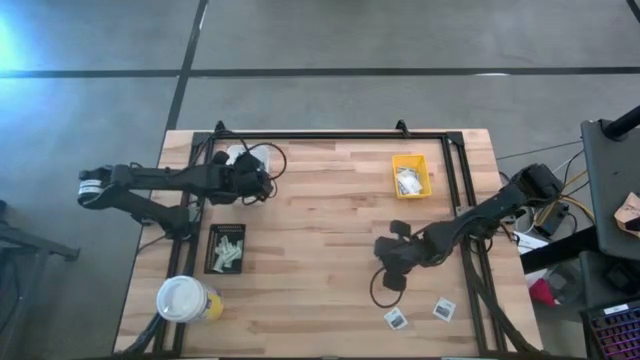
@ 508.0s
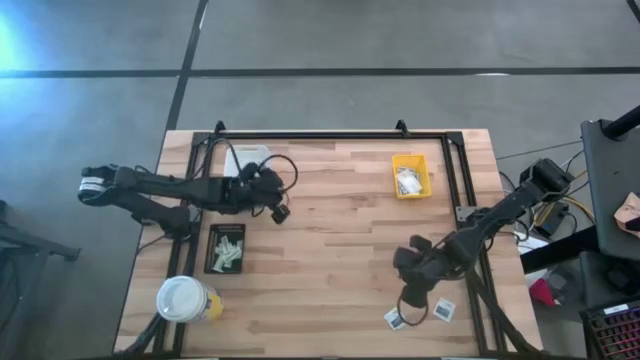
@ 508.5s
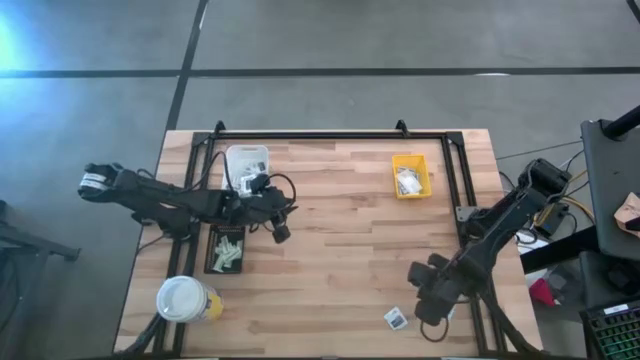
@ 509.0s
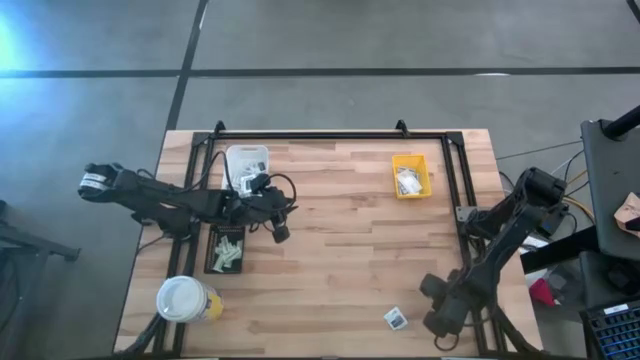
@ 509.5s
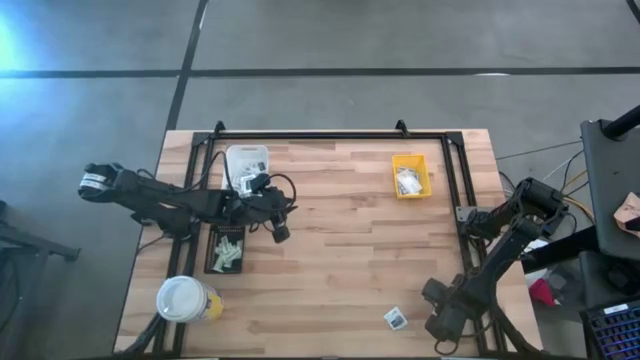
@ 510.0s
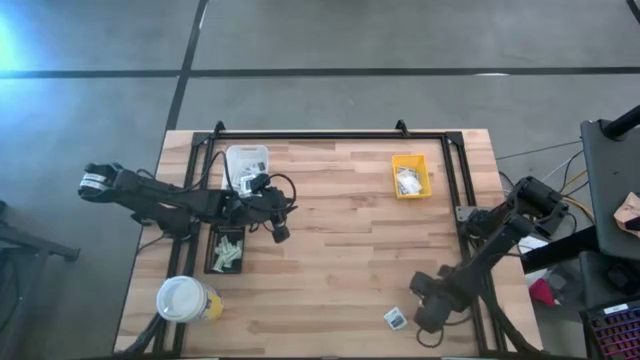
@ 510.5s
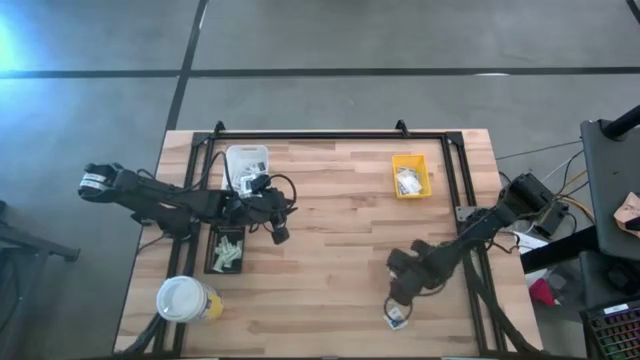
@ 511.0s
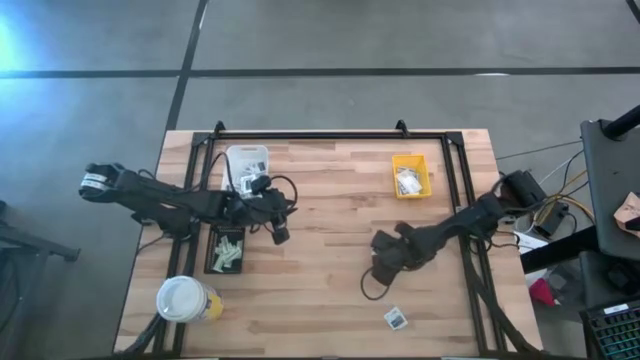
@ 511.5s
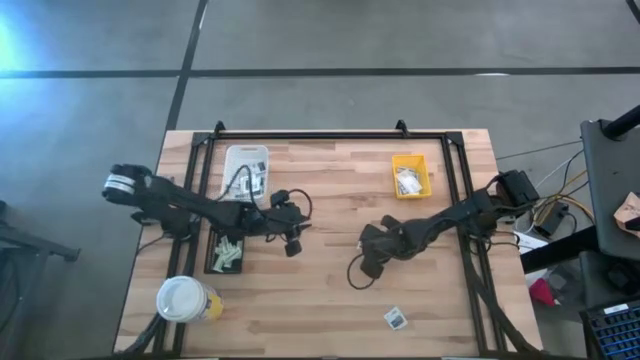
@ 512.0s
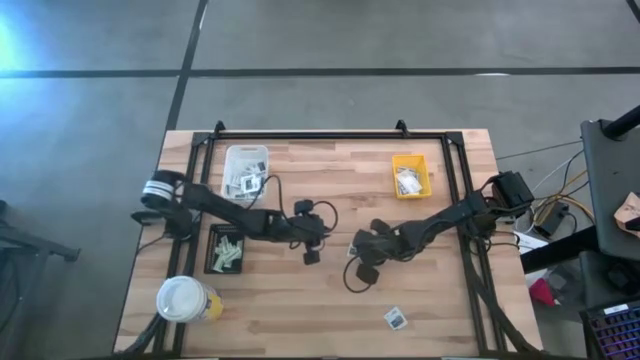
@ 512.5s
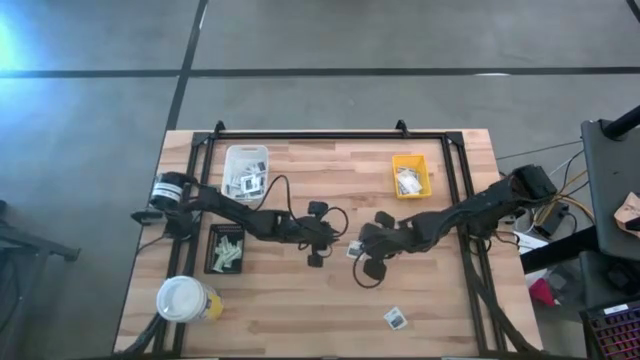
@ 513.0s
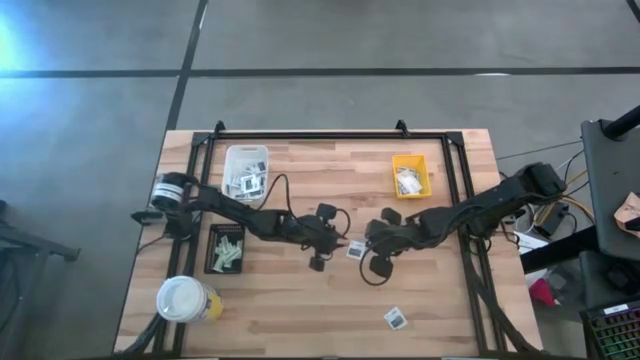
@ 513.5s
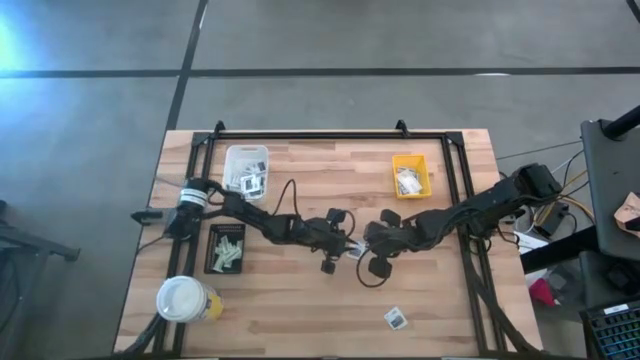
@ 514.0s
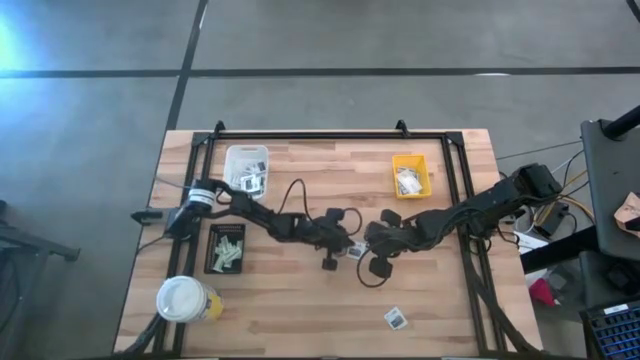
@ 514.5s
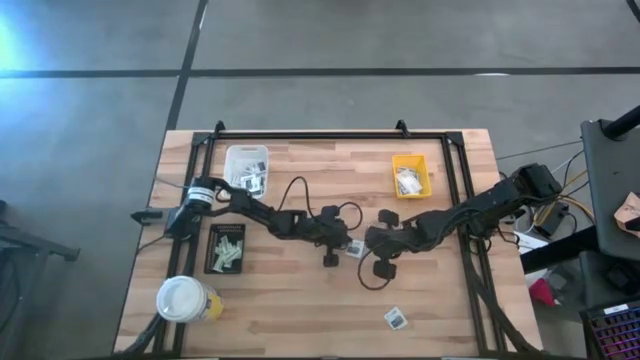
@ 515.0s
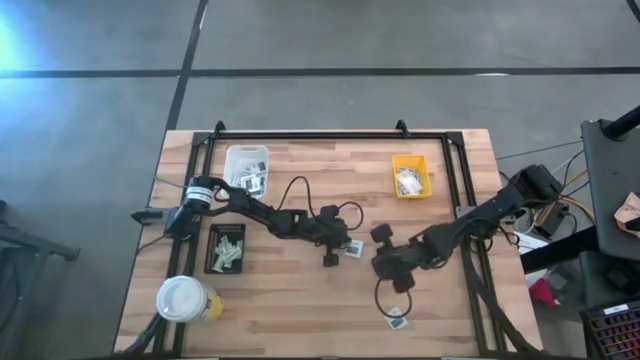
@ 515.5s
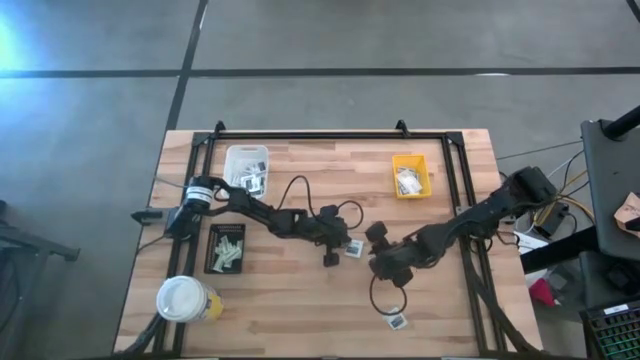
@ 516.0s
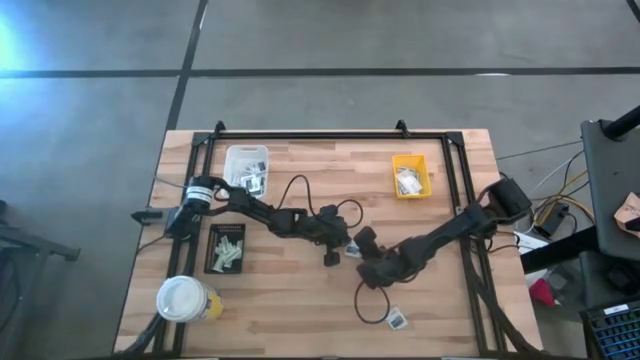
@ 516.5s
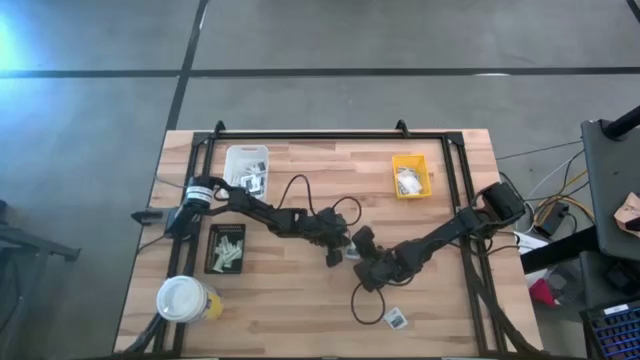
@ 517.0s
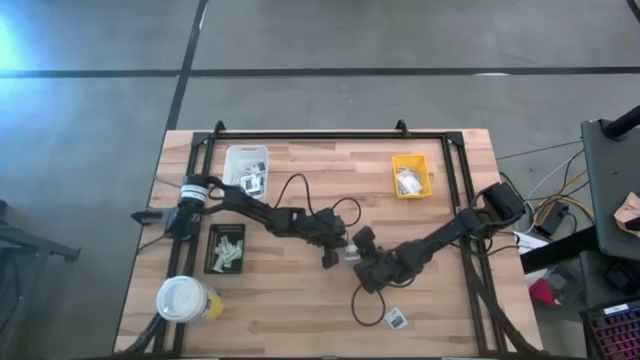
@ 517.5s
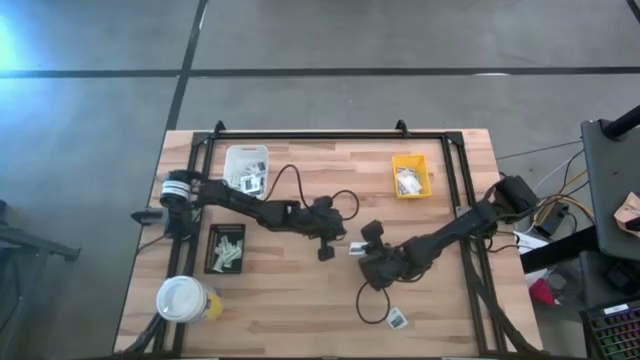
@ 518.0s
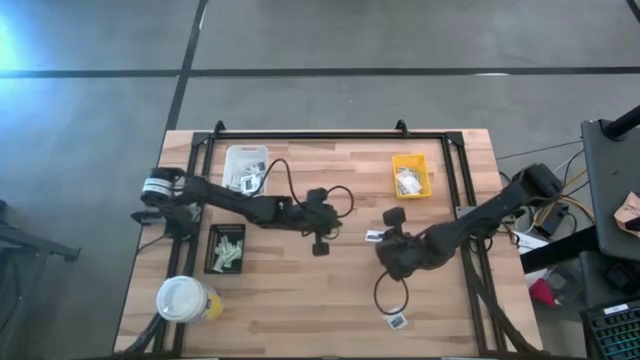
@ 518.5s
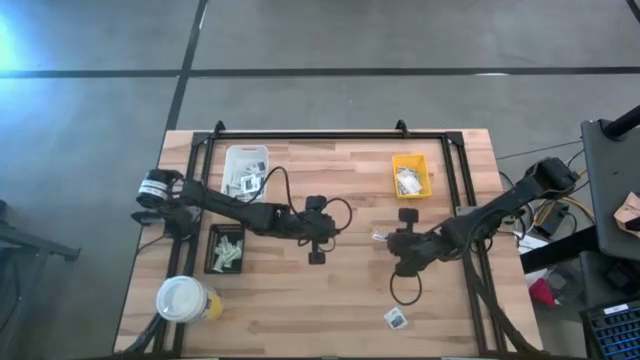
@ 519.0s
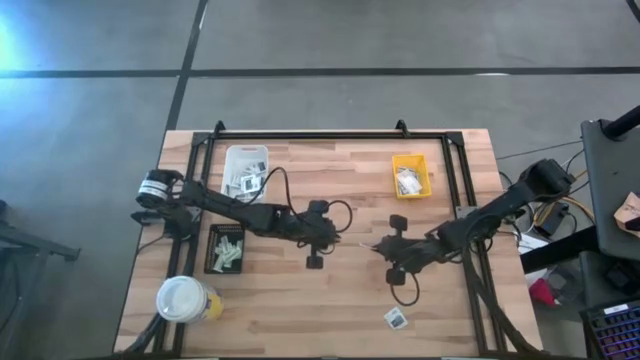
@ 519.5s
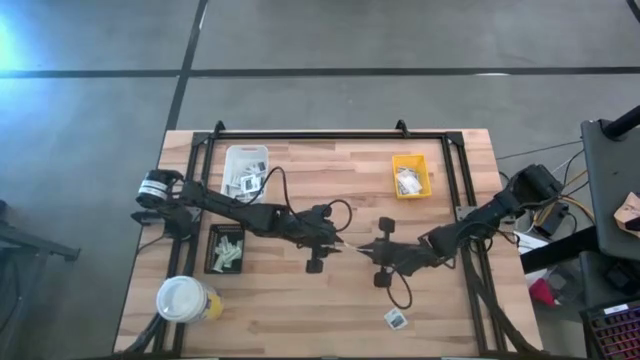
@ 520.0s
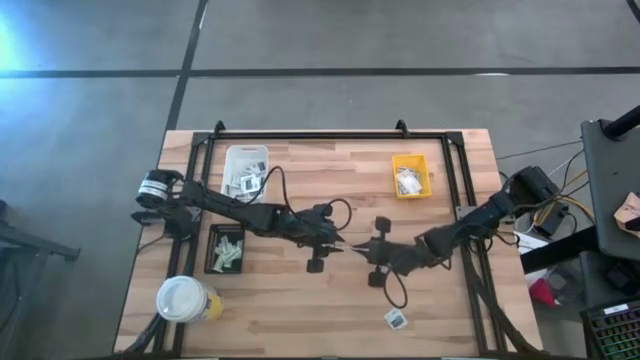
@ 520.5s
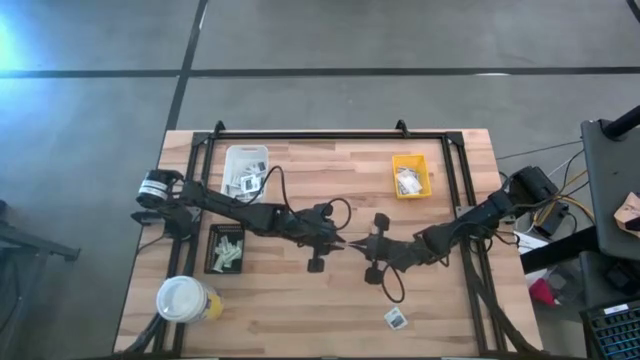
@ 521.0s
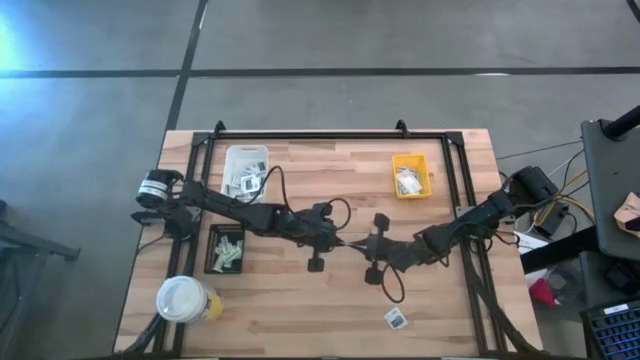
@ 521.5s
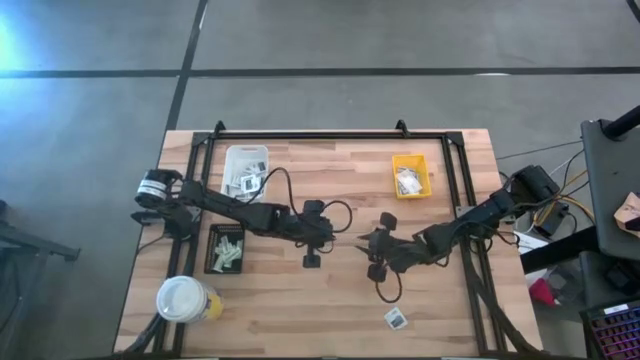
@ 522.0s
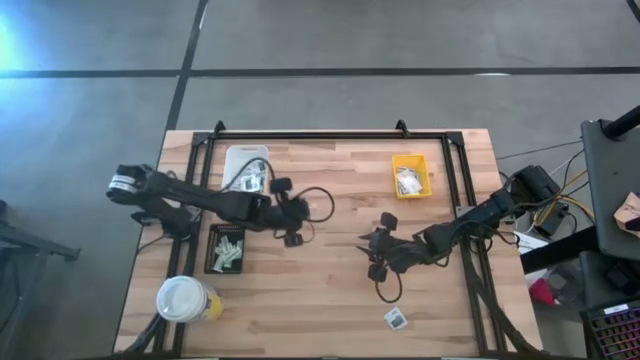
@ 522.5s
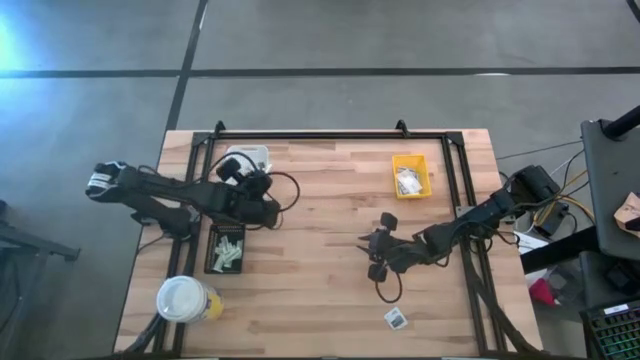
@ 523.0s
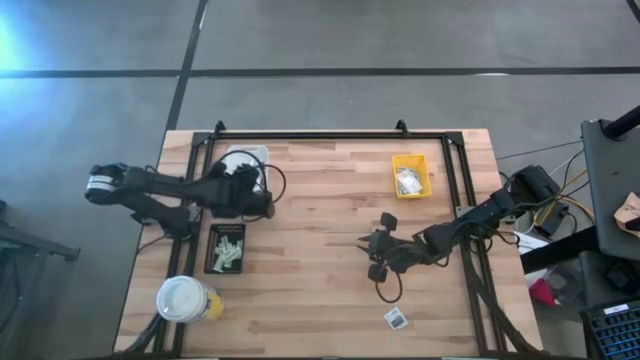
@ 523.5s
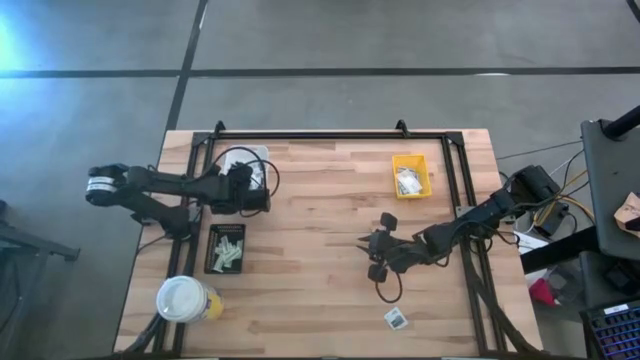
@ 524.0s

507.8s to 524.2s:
Task: Pick & Place First Aid Supplies
Put the gray towelette pack into the white bin

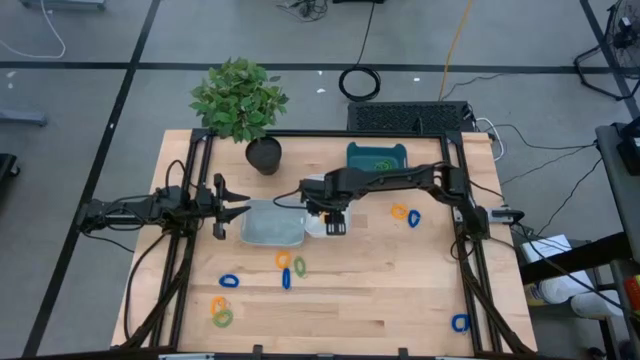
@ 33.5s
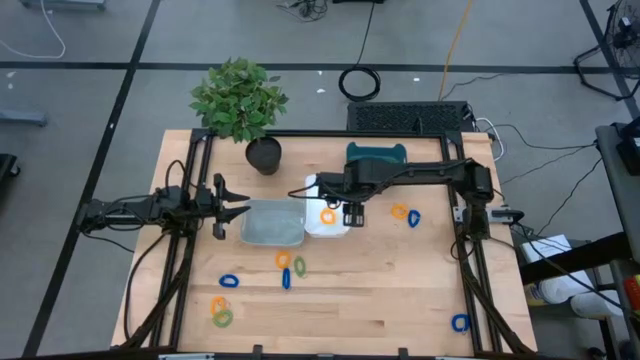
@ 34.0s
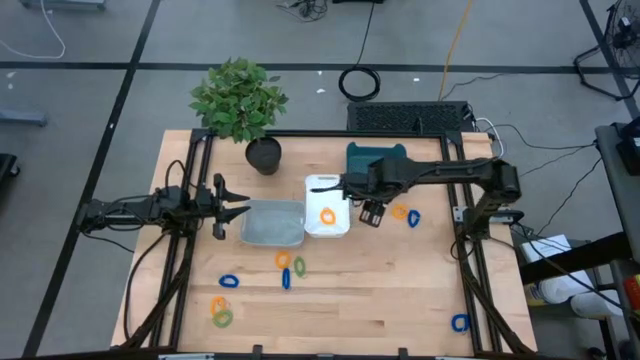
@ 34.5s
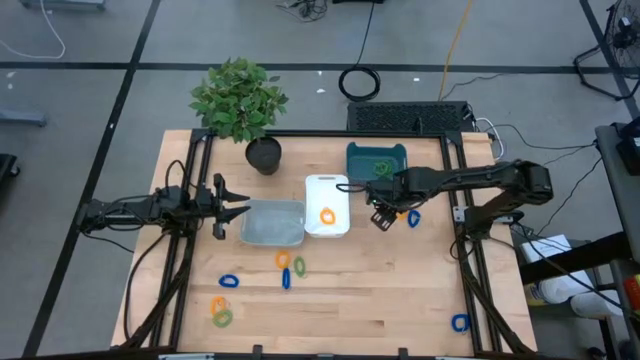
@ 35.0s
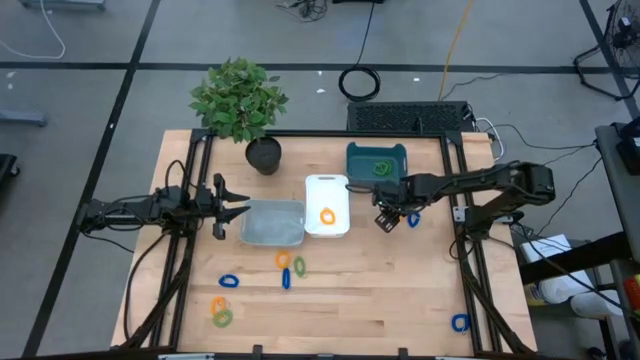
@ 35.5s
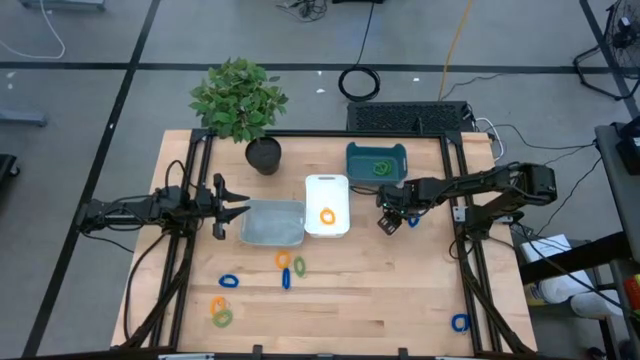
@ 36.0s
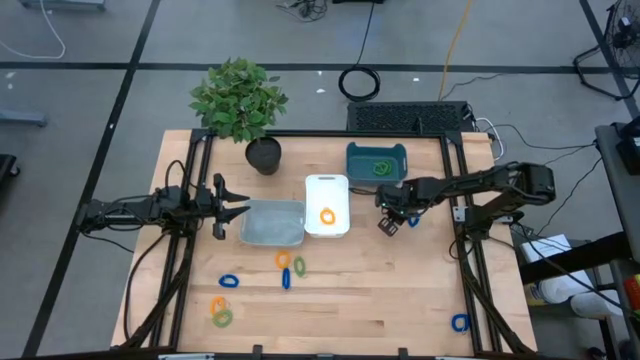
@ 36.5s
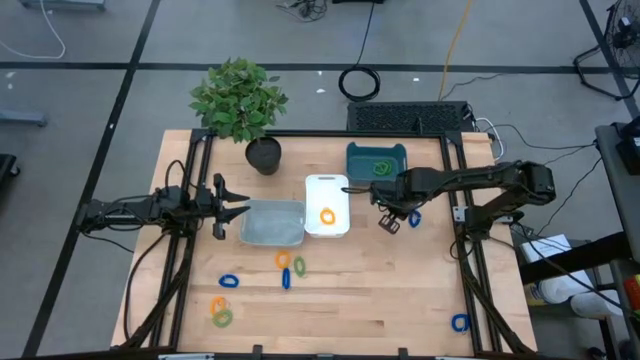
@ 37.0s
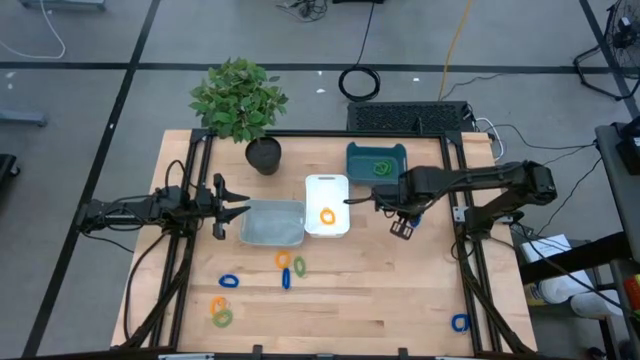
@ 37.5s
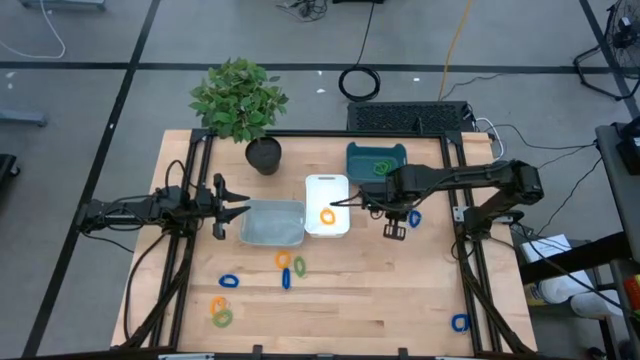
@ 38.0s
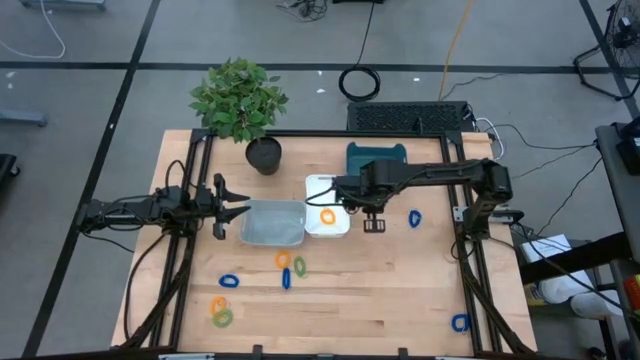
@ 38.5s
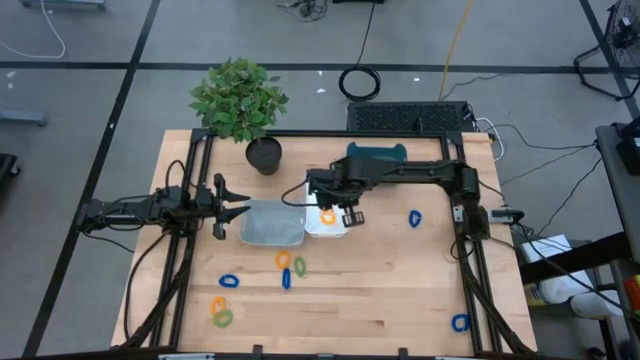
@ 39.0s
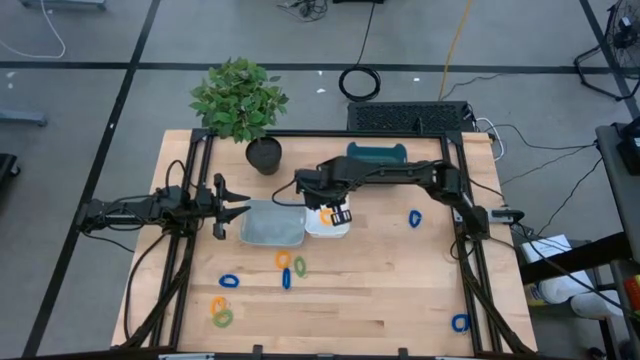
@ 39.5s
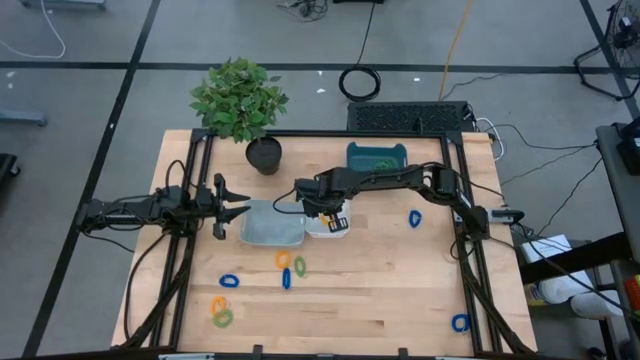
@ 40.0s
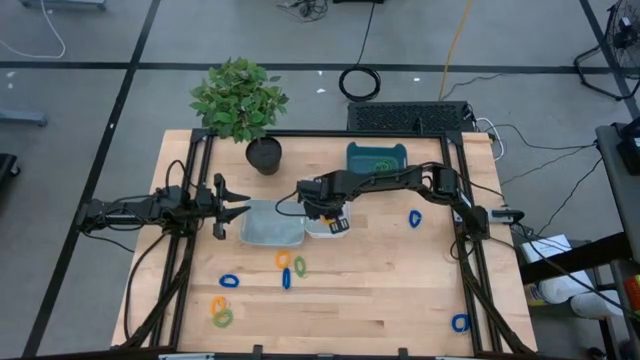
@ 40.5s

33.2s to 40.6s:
Task: Sort spring keychains
Put the yellow spring keychain into the white bin
